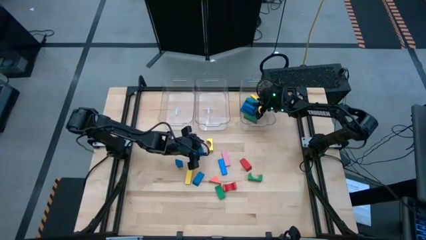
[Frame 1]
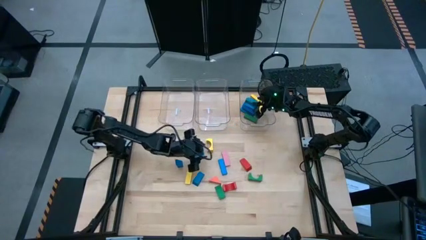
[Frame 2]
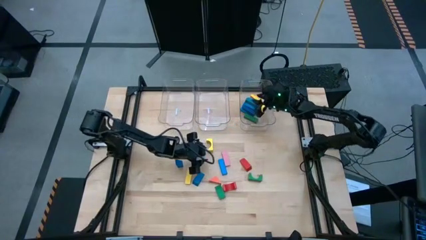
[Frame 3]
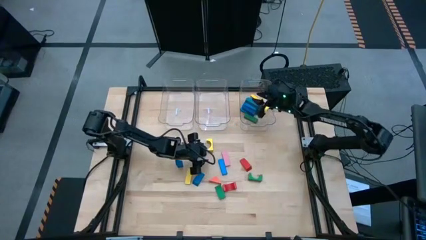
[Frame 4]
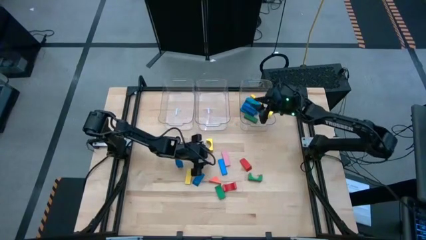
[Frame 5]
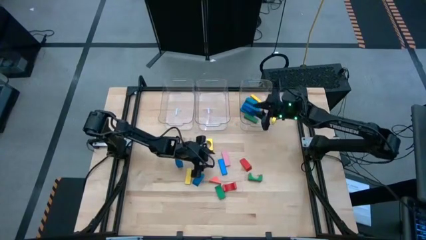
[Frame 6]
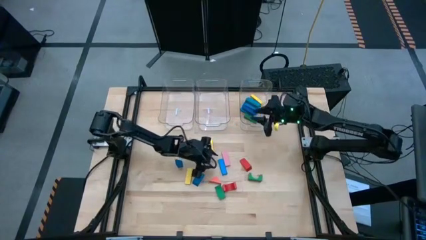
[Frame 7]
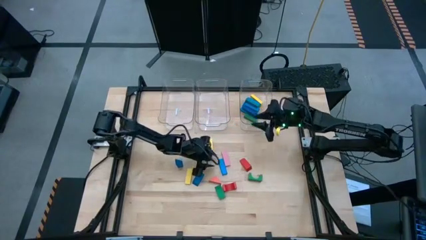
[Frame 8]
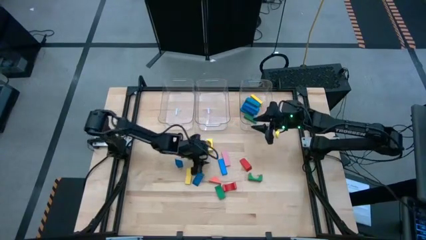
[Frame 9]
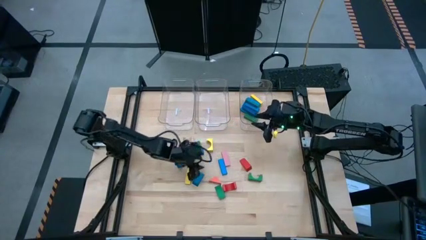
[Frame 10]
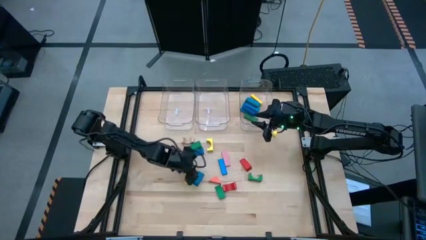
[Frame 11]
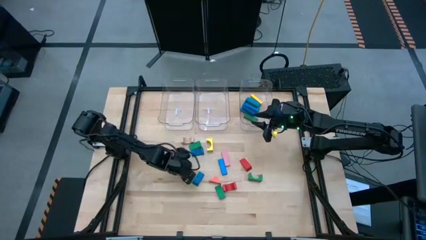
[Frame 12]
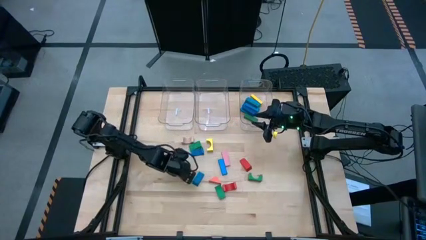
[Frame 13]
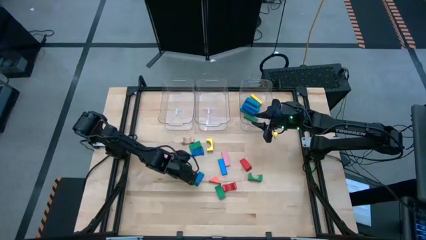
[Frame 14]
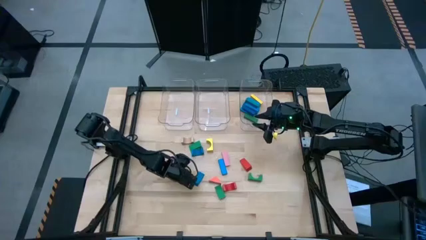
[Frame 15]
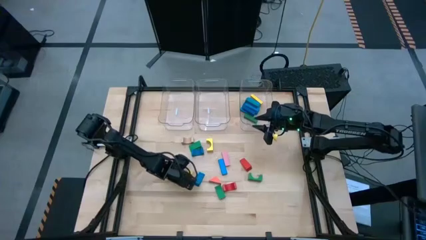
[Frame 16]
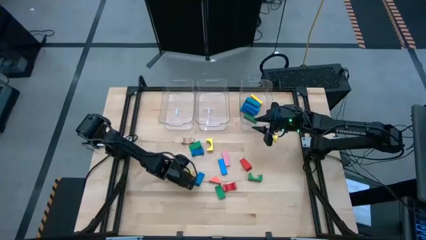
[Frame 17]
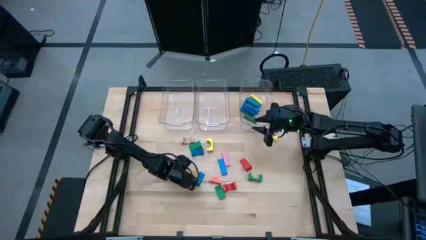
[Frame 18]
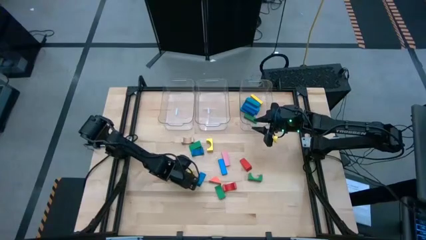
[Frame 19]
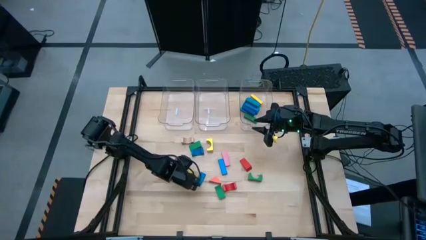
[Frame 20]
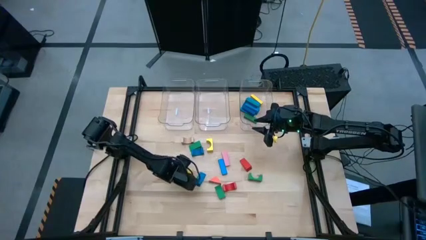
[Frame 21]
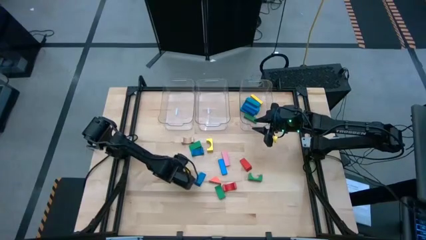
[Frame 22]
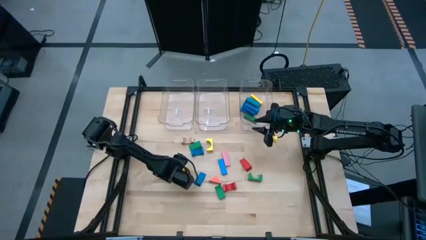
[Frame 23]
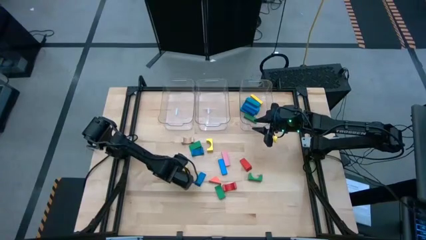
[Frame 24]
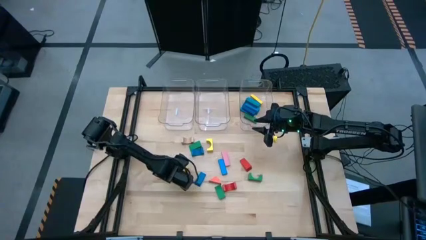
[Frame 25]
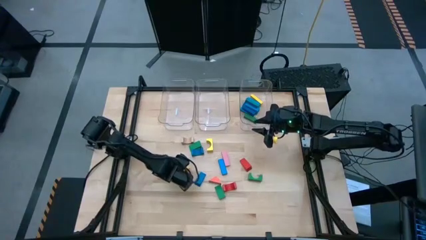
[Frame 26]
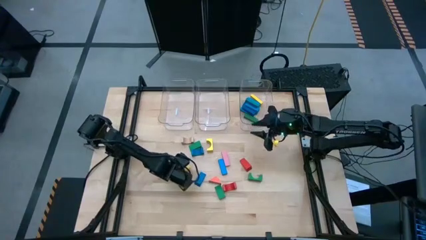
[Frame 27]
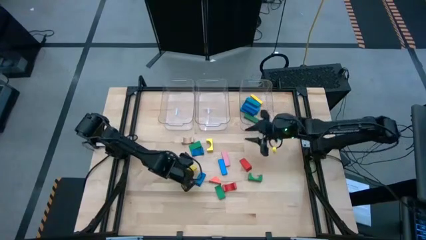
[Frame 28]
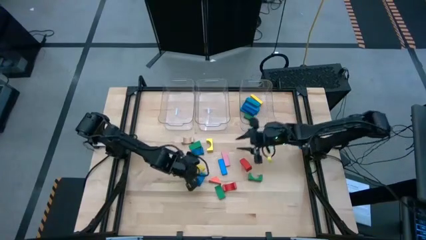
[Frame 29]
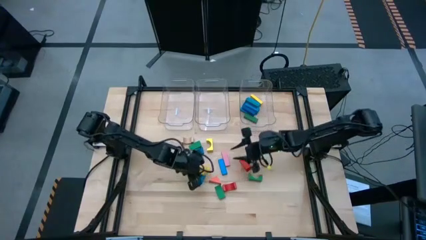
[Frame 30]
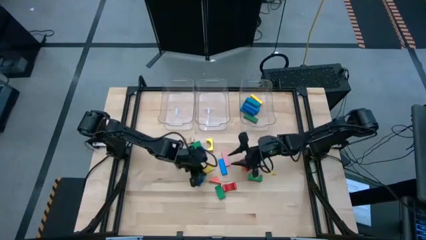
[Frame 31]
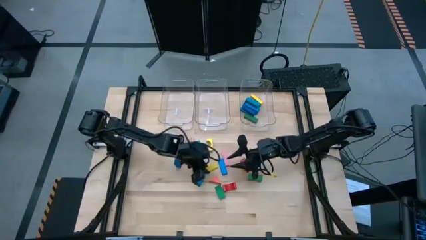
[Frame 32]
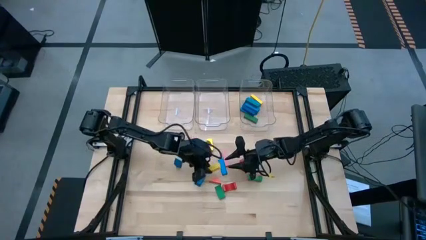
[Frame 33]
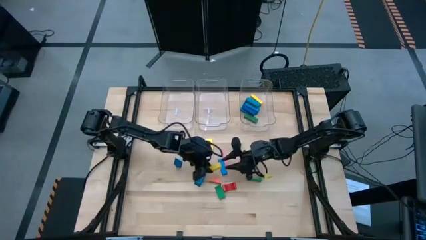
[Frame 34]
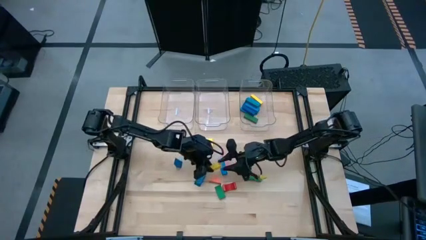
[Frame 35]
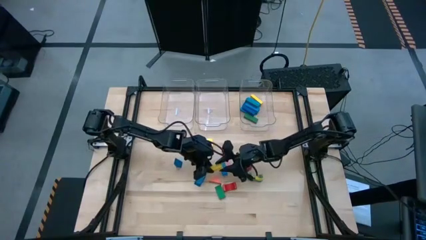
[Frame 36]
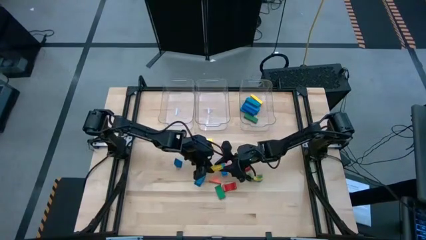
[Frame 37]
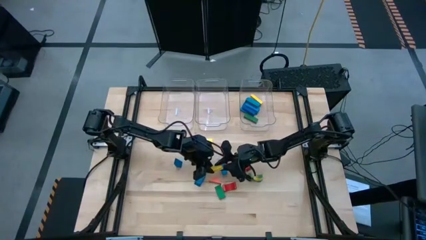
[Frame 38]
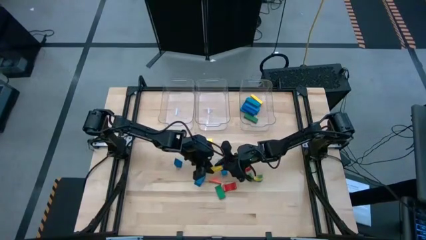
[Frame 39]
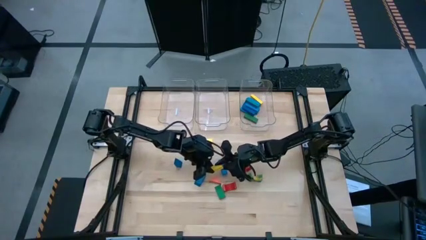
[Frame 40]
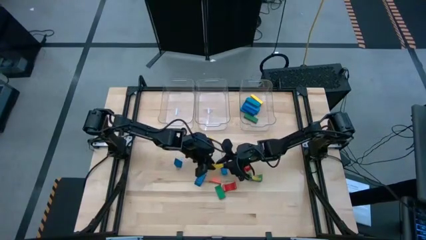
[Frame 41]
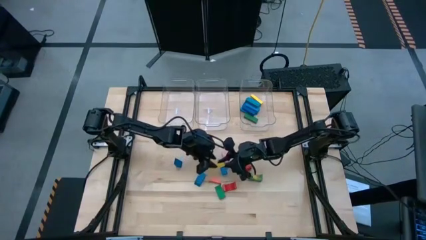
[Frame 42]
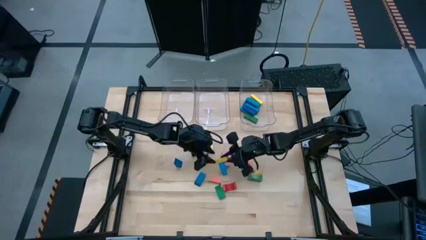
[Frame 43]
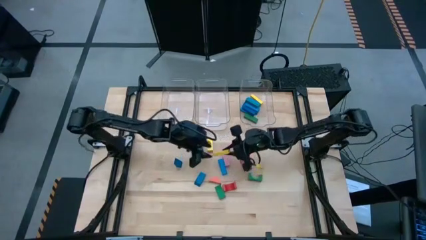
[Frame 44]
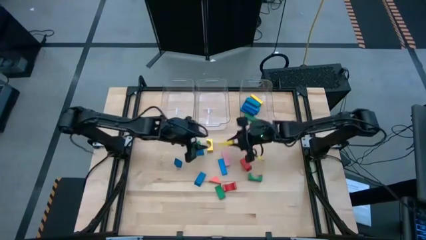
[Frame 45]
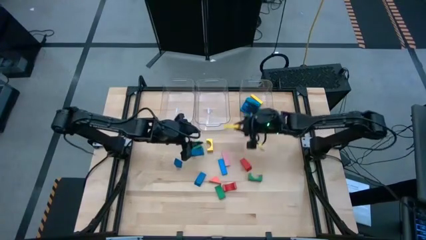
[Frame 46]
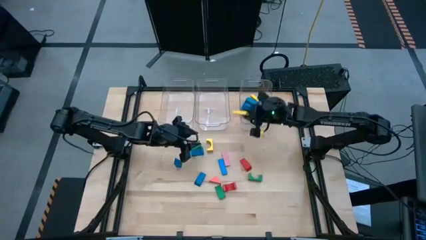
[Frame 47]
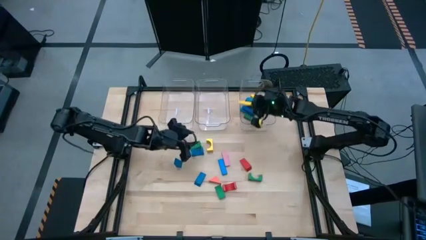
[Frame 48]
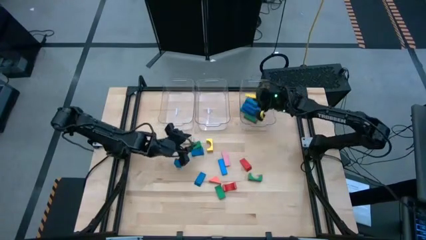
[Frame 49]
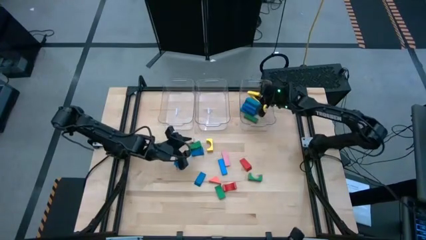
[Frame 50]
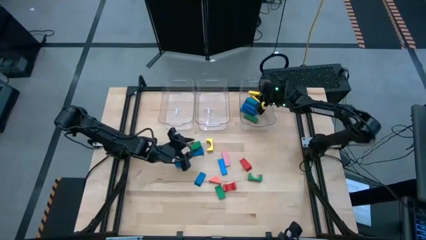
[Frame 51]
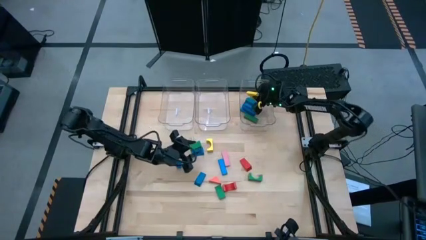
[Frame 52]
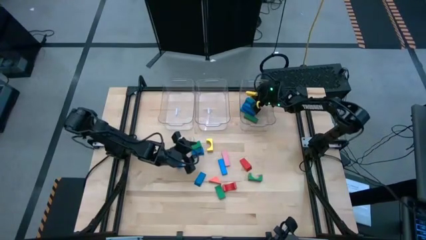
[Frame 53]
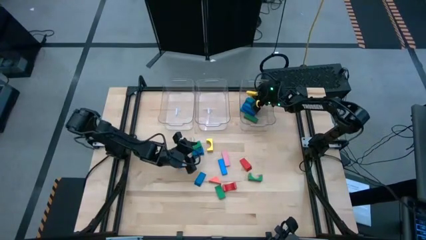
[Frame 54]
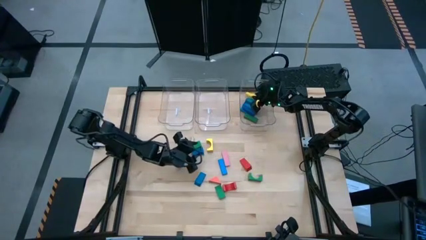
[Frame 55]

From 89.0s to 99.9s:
Task: Sort blocks by size
Put the yellow rectangular block into the right transparent bin
